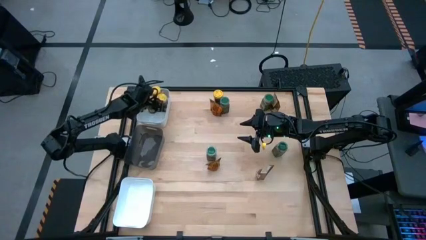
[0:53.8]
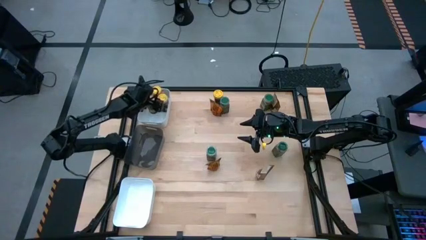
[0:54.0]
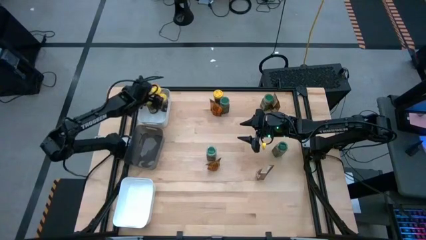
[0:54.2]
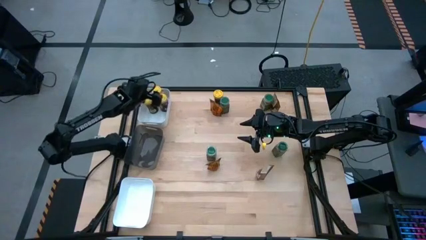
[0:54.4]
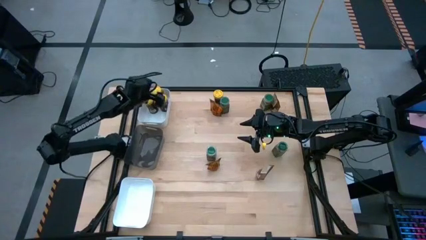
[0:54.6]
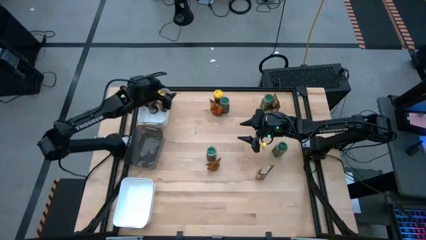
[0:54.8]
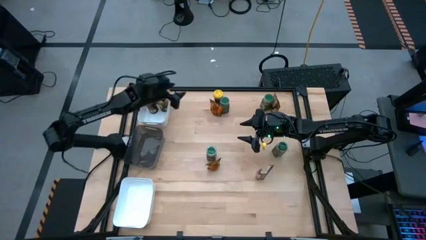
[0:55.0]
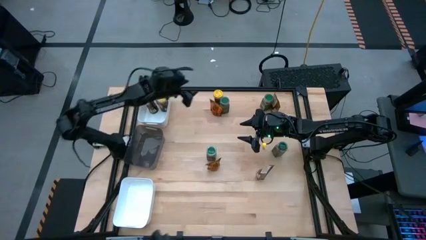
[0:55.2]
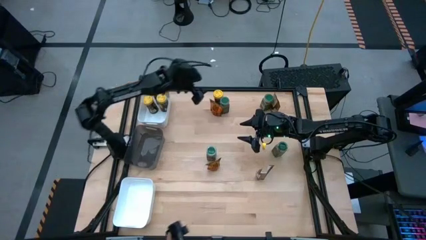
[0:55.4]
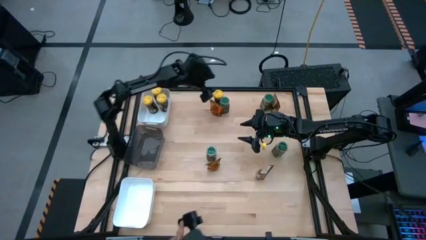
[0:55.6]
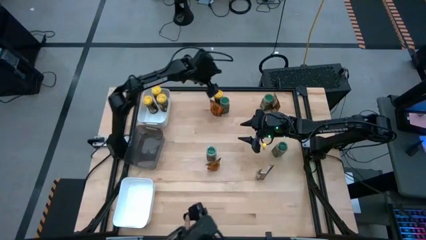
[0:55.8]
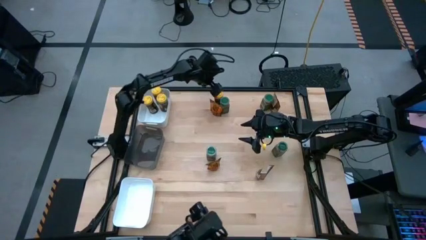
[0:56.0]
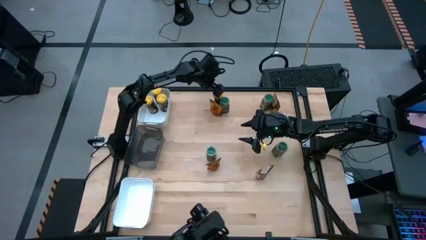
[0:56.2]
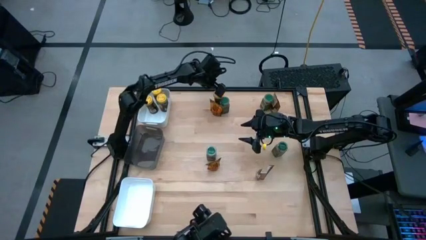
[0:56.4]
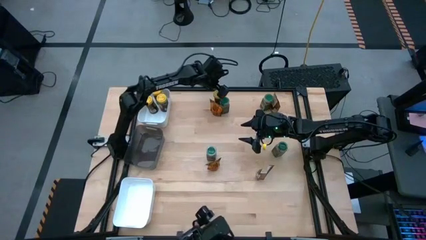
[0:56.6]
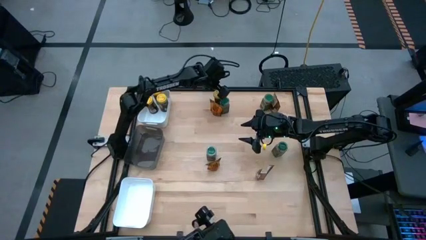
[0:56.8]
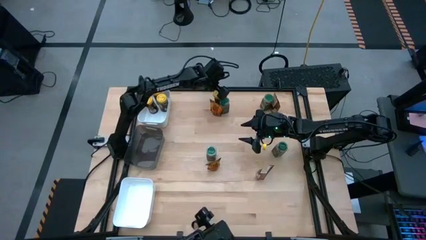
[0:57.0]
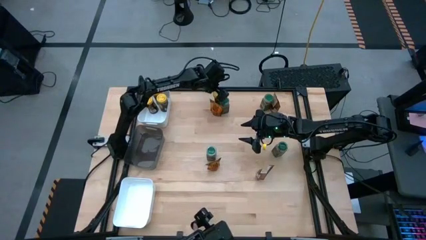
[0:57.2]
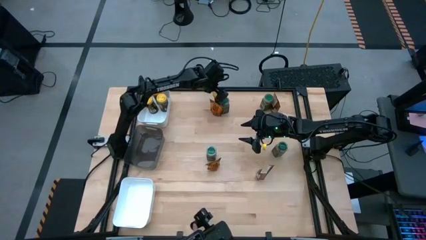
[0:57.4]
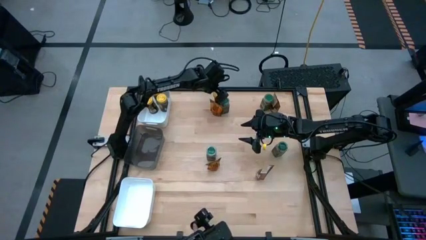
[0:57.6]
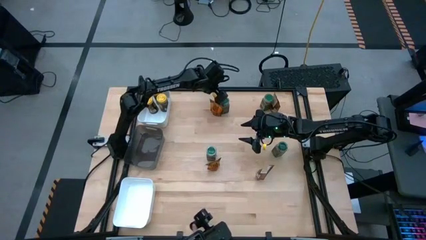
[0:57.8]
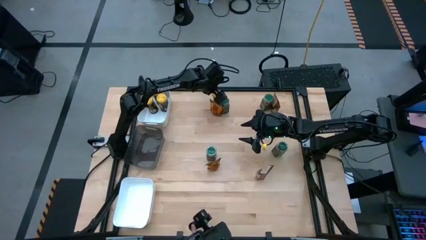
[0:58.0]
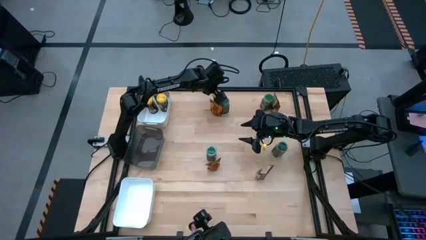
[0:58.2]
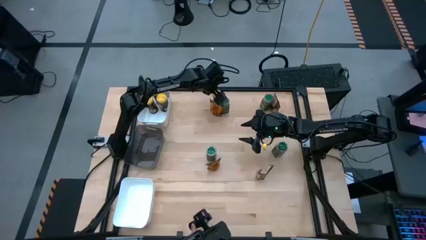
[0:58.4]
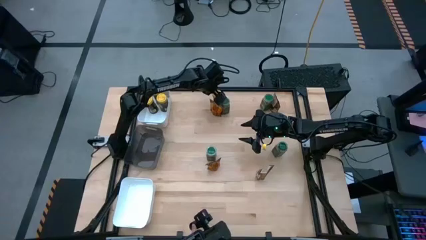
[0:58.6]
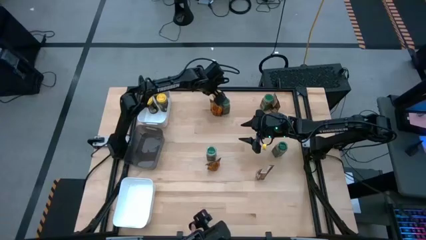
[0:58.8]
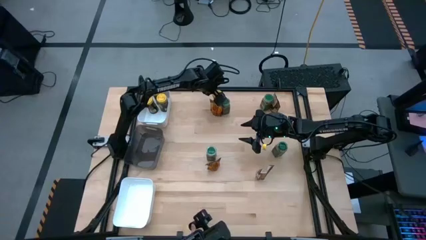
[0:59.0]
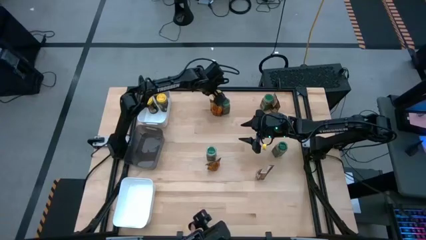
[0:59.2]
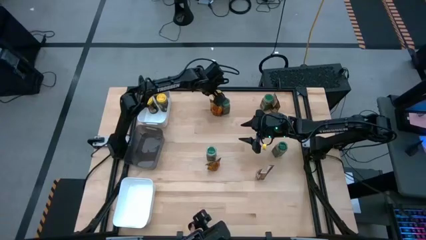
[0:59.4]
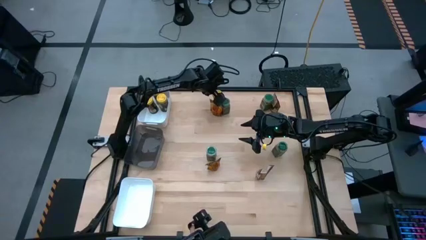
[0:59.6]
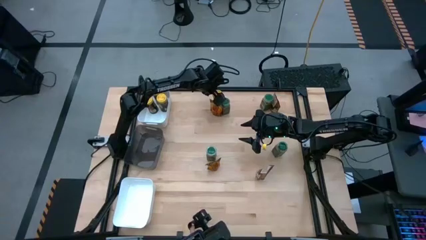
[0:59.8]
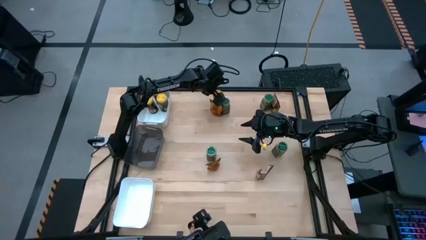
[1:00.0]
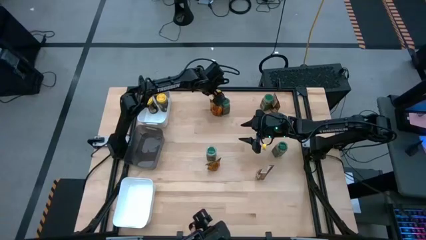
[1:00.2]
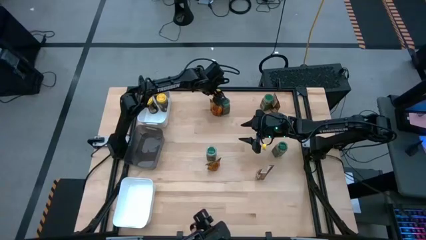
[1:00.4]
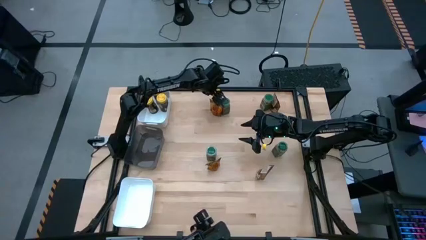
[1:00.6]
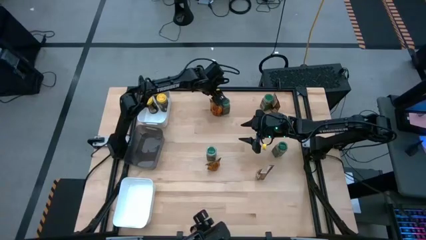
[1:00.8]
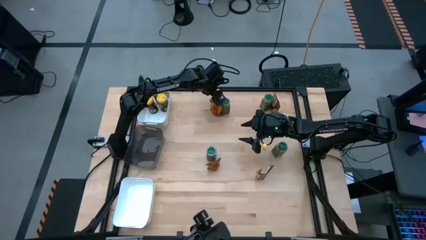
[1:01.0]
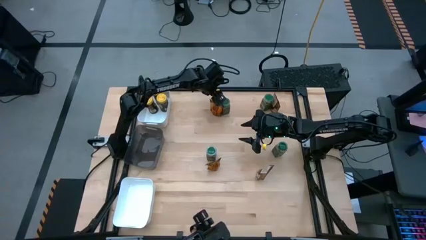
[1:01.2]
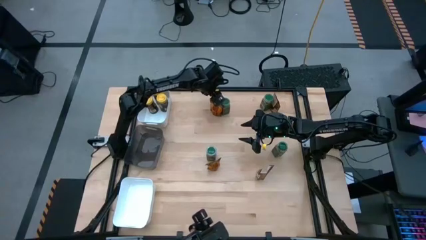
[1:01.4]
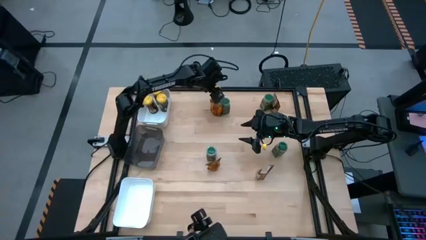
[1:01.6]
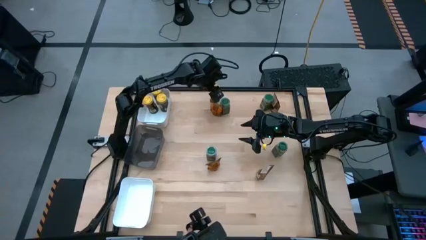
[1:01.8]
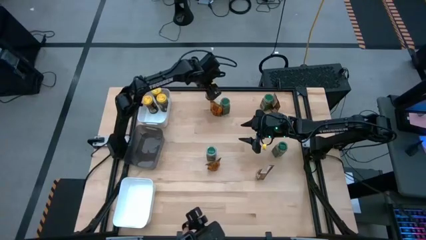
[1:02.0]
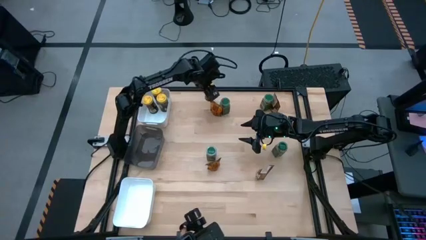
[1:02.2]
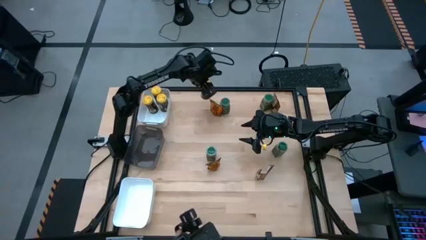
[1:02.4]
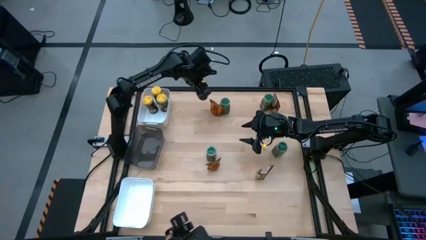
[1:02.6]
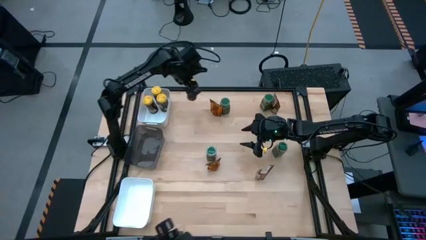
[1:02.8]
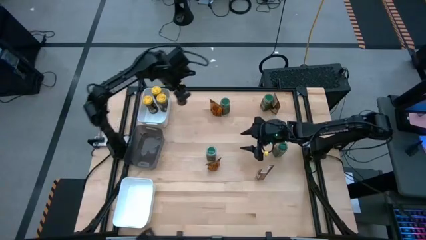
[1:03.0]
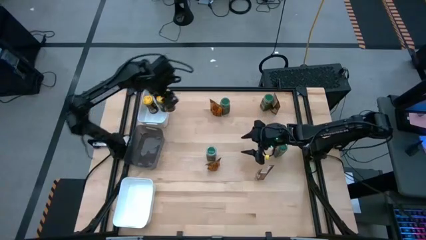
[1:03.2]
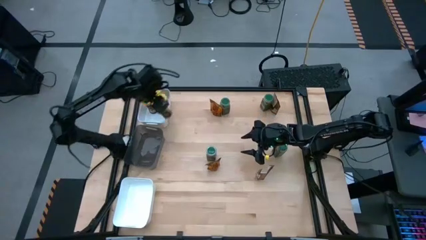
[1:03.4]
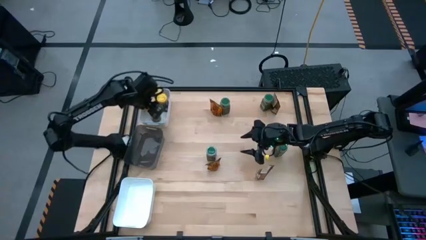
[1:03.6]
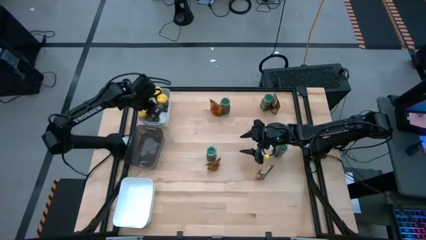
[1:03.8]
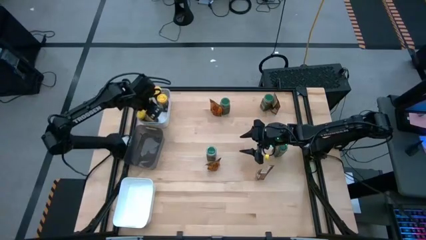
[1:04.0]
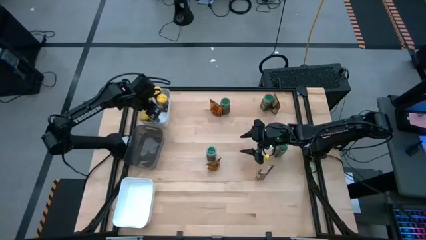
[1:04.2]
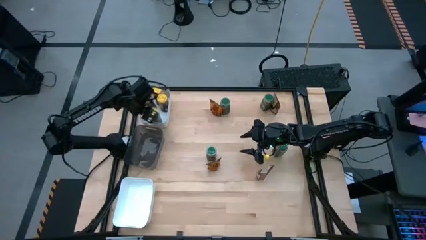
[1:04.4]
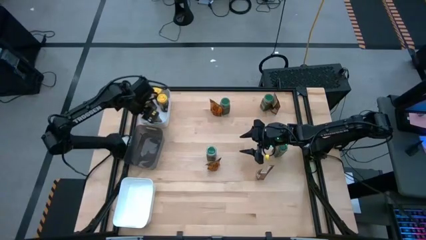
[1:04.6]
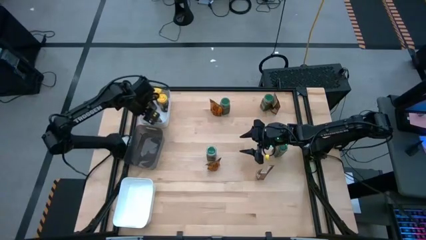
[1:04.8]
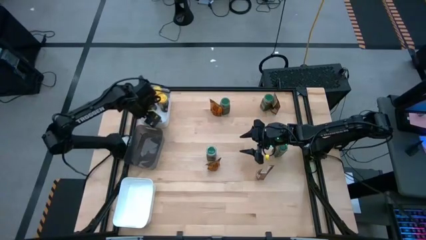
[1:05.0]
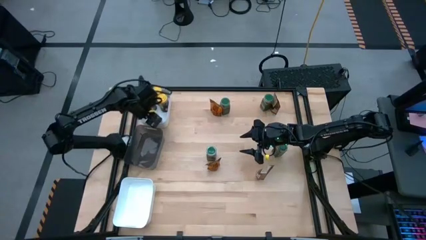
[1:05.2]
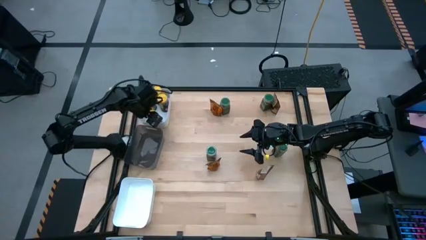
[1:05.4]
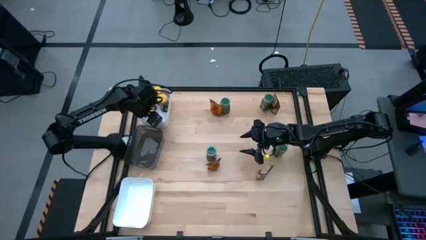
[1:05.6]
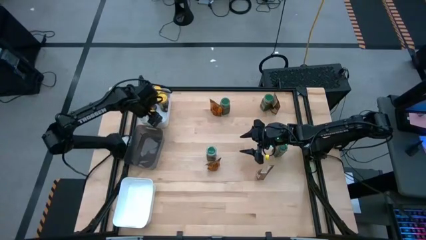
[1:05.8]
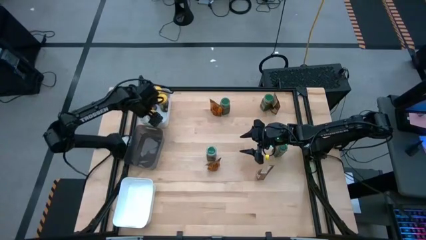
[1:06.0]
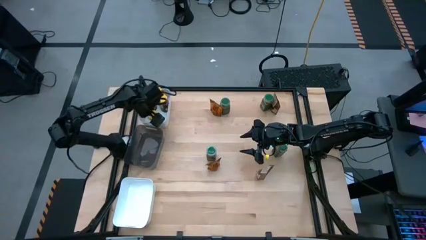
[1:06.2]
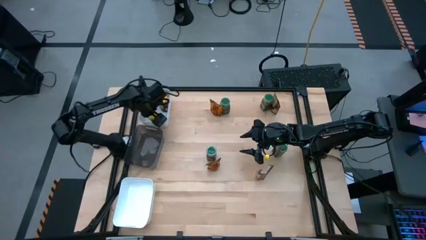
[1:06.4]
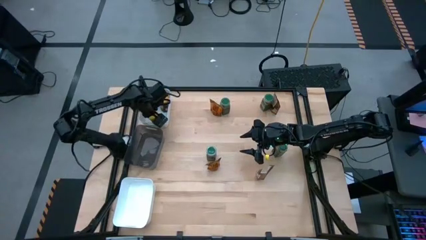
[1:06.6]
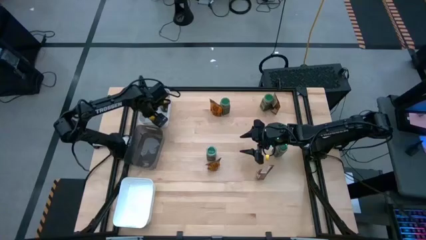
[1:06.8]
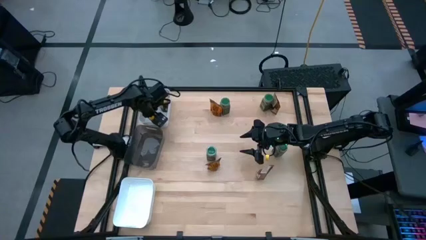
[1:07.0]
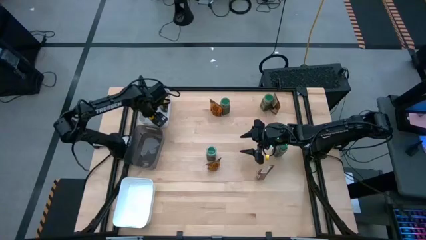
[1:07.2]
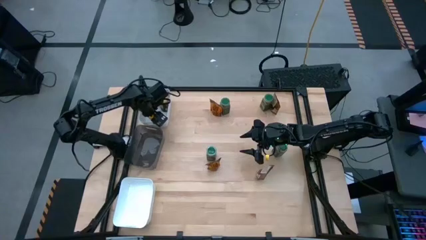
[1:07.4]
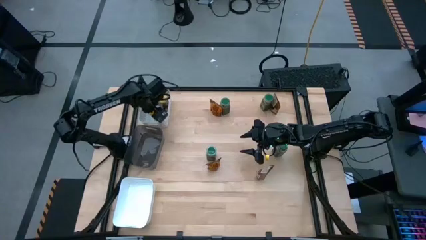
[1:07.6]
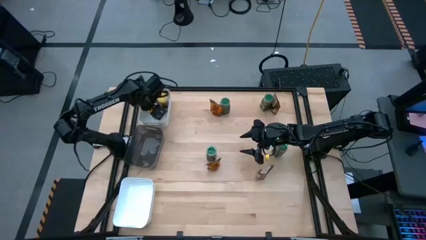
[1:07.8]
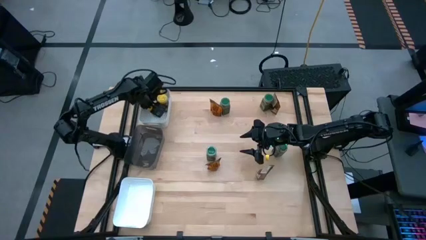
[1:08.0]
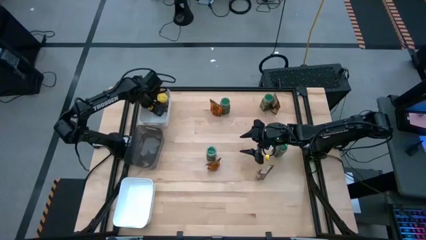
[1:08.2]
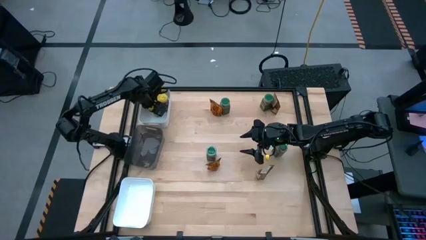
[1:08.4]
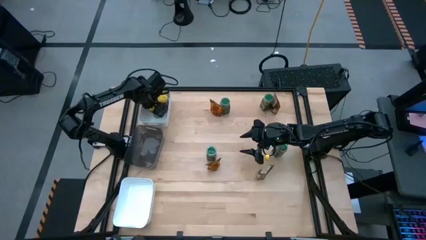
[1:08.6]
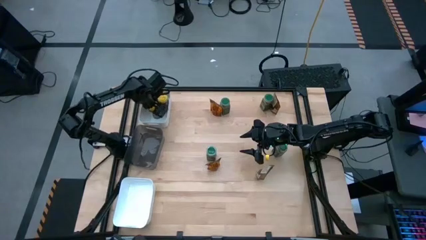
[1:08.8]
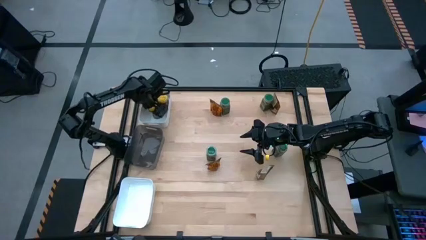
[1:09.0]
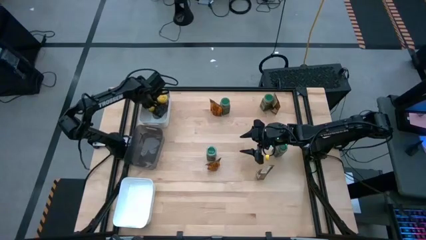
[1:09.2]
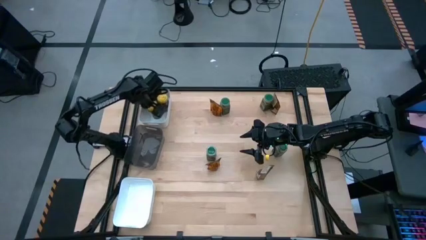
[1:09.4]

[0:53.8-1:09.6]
Task: Sort spices by type
Put the yellow seasoning bottle into the top white bin
